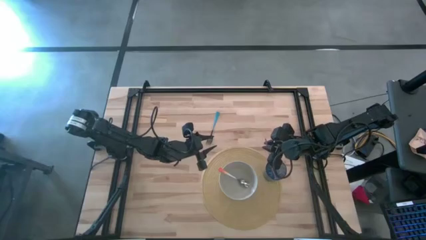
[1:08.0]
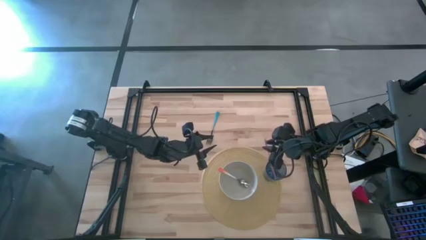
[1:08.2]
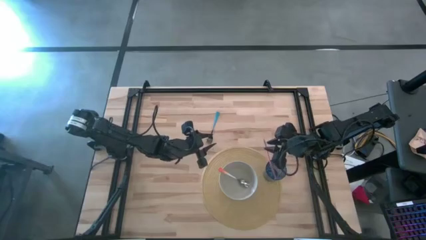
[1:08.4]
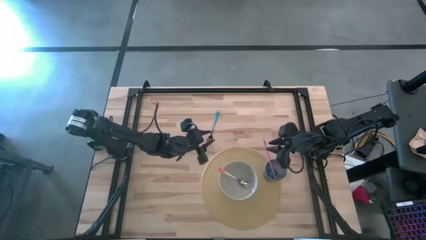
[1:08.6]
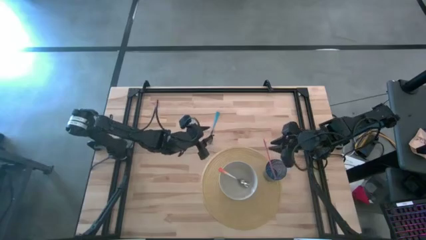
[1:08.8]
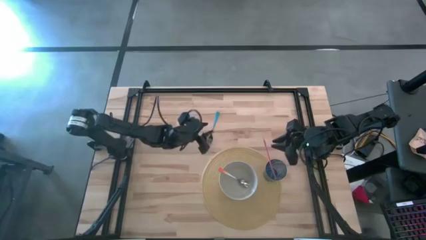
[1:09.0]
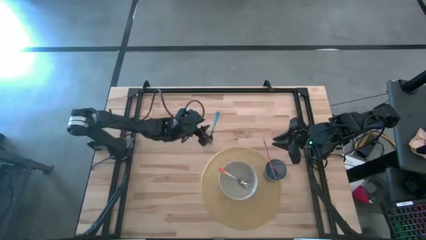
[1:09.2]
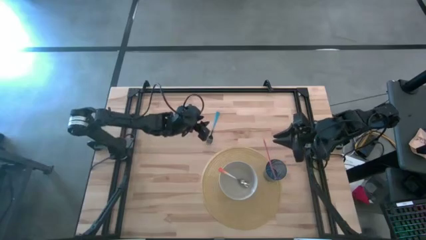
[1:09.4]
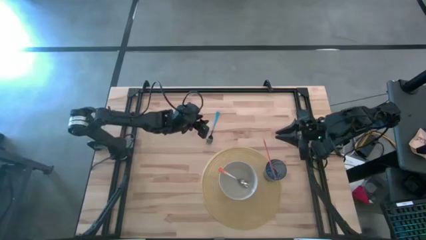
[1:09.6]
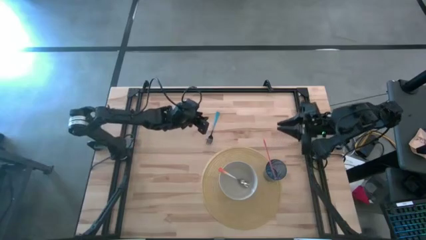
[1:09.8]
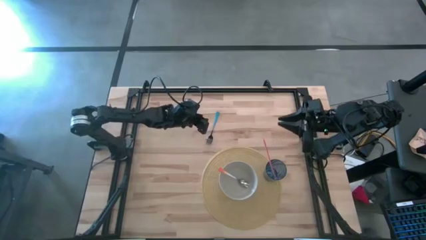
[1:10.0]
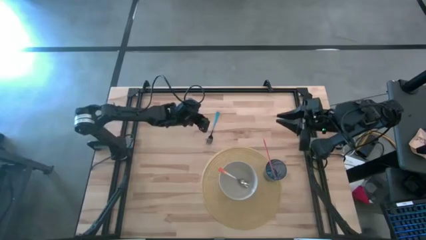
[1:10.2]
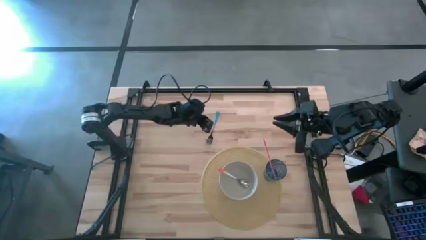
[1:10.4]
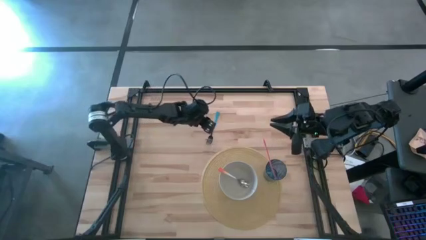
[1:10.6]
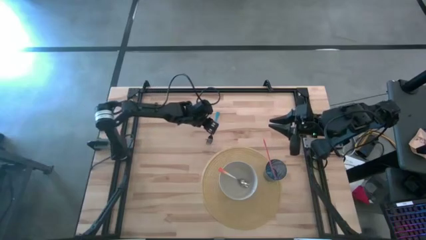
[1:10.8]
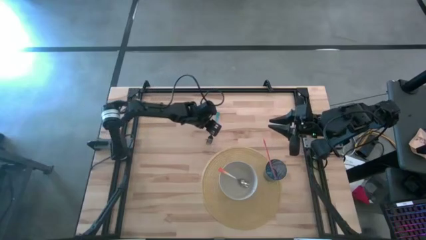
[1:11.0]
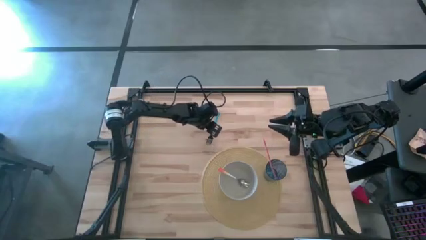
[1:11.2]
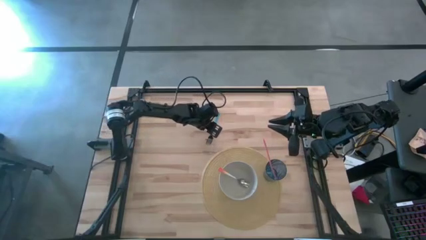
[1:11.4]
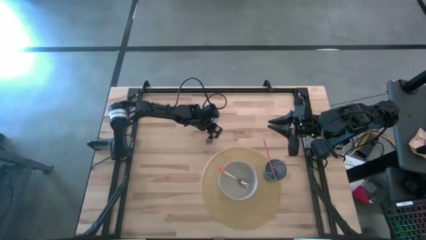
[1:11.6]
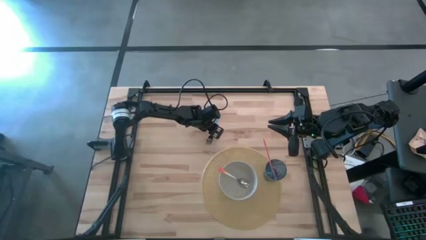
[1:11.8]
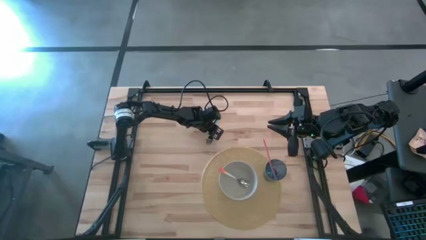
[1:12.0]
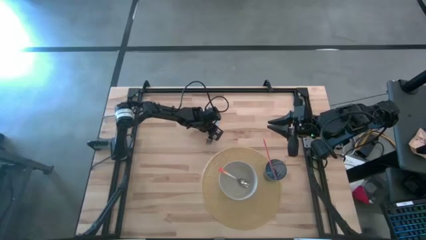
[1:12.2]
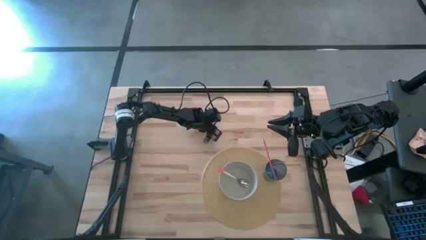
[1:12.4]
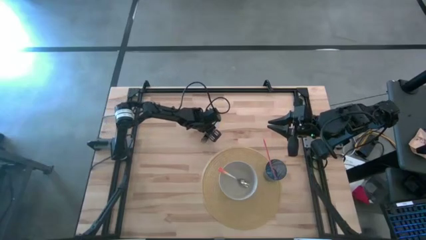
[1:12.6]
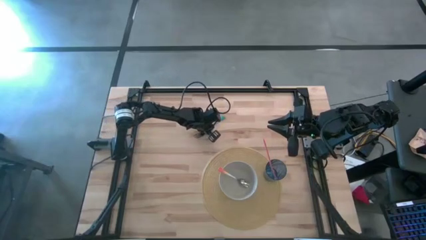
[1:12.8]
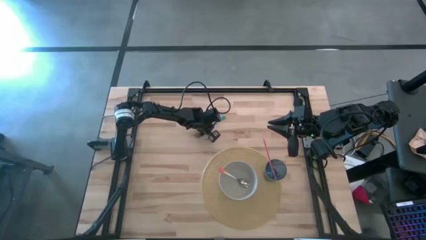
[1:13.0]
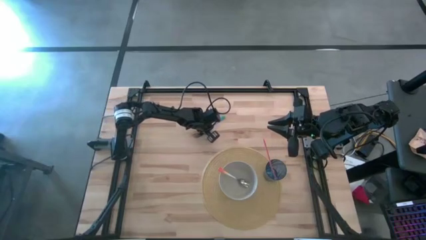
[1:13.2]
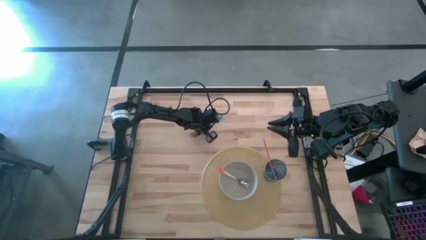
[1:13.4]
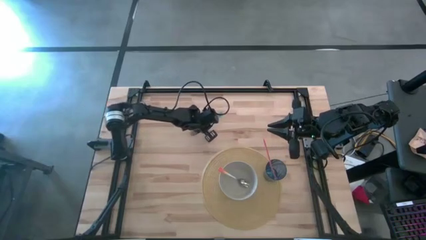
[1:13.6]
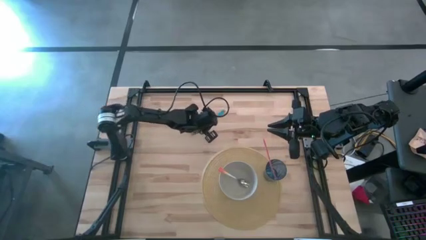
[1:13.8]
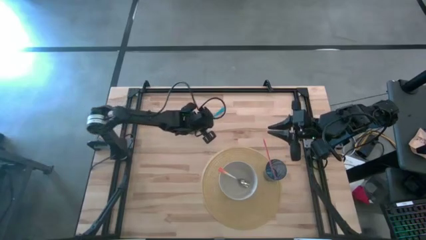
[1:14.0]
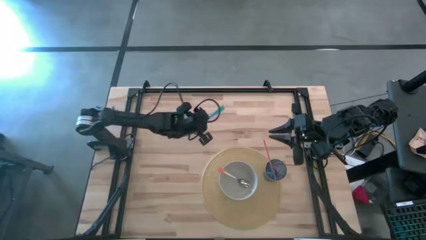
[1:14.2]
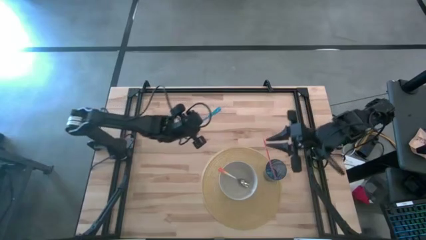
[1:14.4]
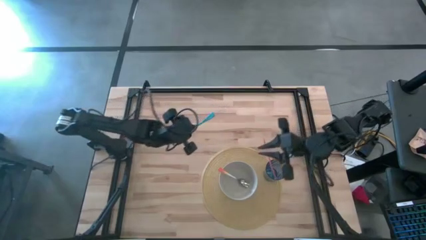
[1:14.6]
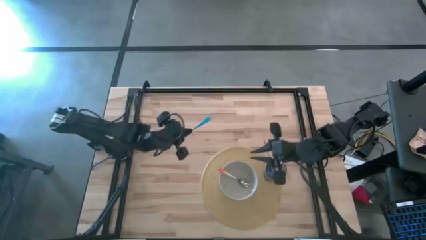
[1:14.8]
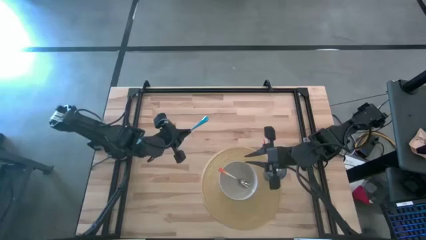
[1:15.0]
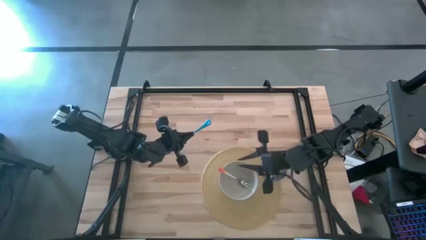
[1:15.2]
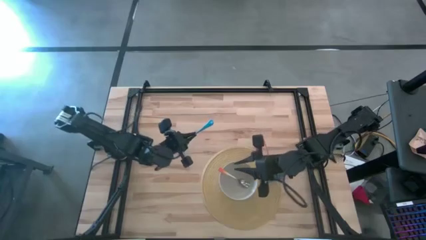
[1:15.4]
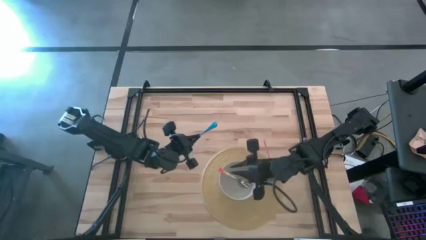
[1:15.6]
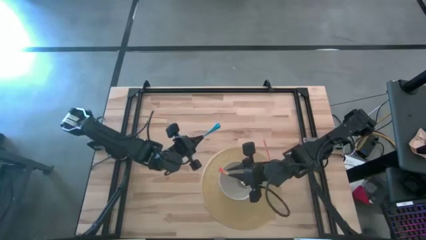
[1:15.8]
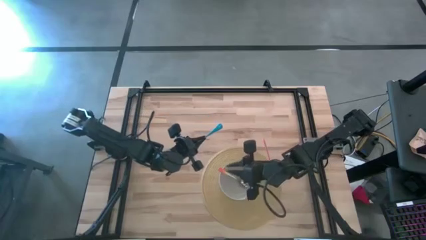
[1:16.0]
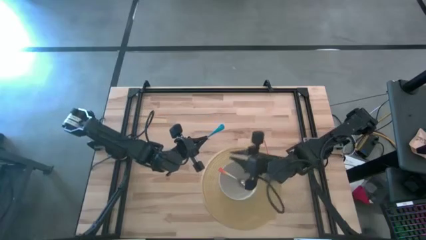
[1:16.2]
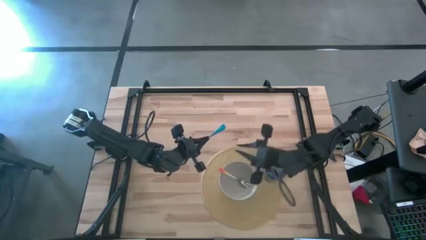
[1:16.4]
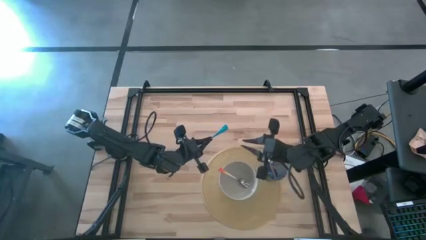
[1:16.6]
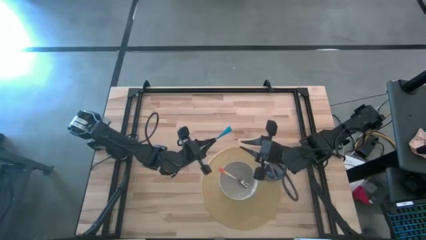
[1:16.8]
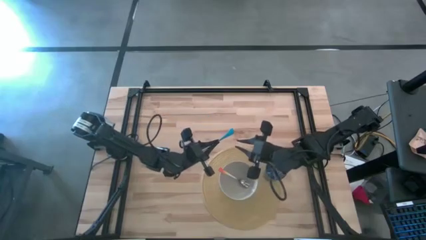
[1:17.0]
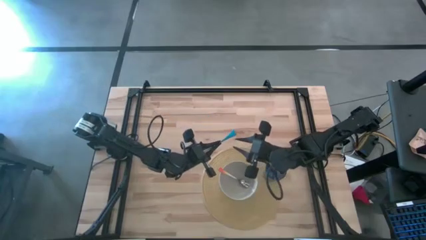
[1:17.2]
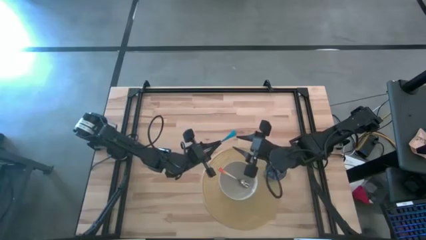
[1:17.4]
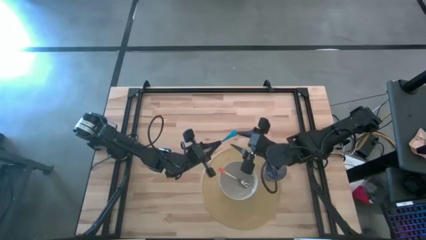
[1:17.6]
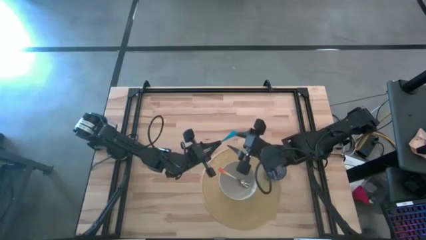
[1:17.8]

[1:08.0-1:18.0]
Task: Pick & Place Utensil
Put the blue fork into the gray bowl

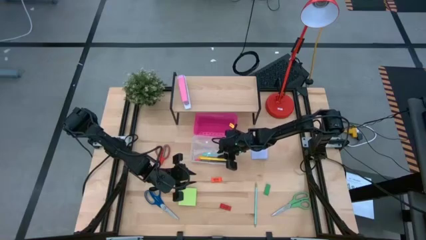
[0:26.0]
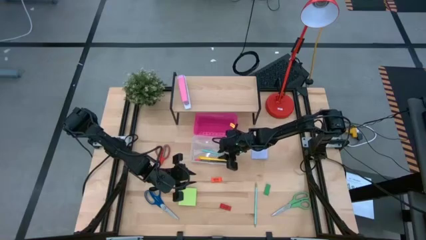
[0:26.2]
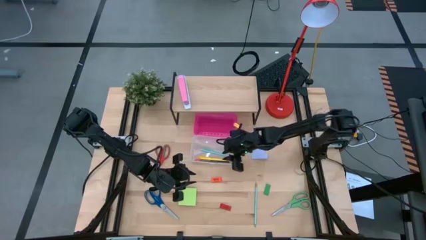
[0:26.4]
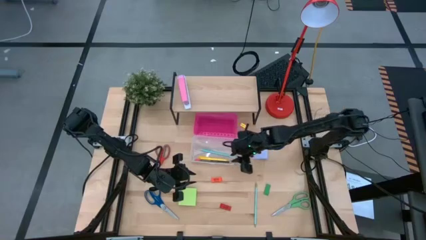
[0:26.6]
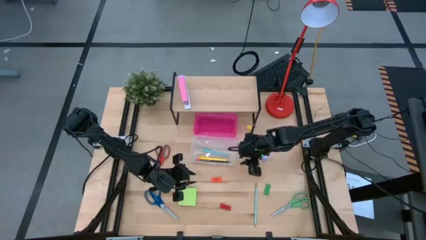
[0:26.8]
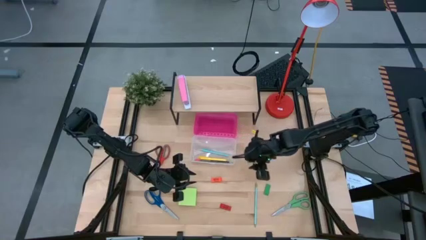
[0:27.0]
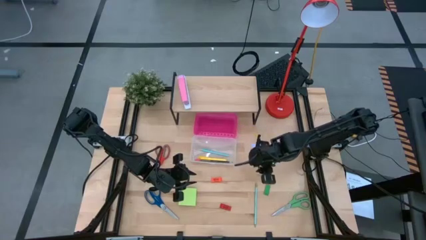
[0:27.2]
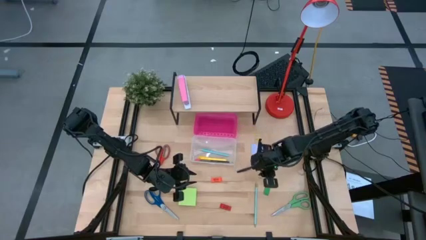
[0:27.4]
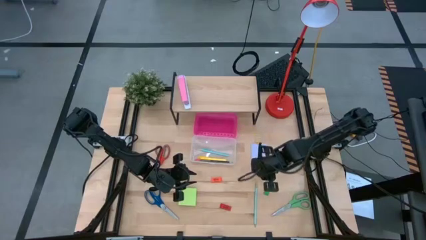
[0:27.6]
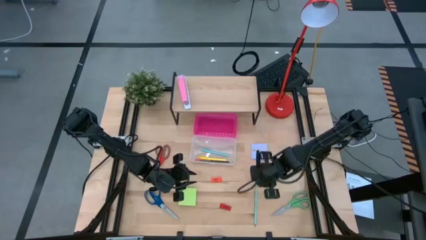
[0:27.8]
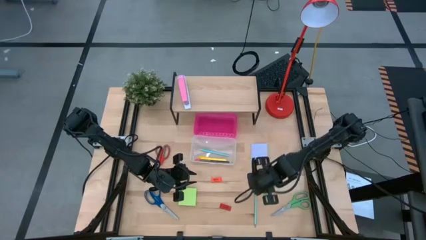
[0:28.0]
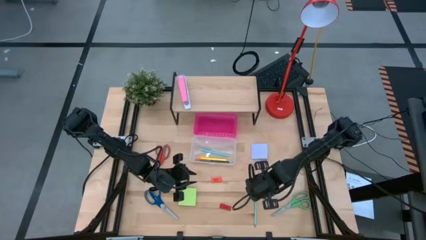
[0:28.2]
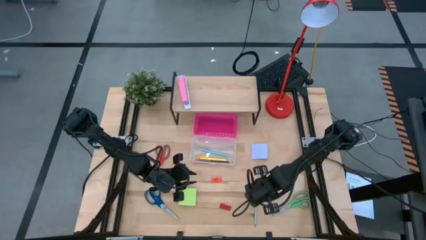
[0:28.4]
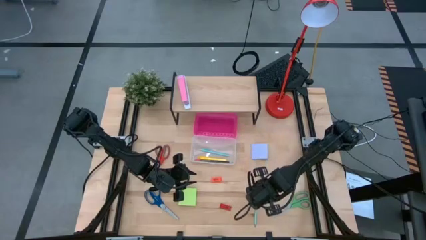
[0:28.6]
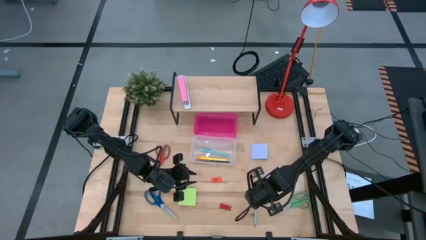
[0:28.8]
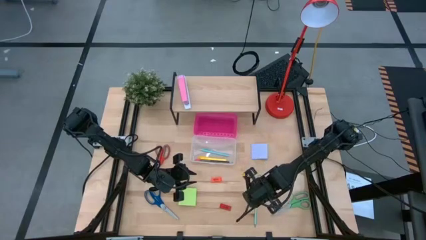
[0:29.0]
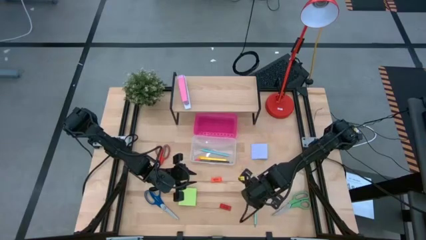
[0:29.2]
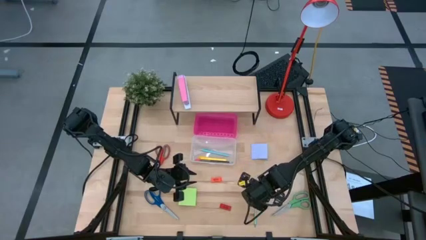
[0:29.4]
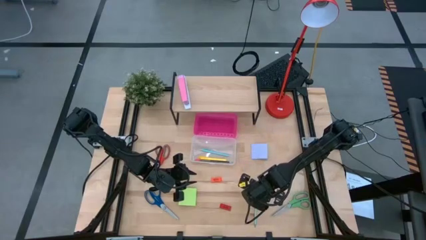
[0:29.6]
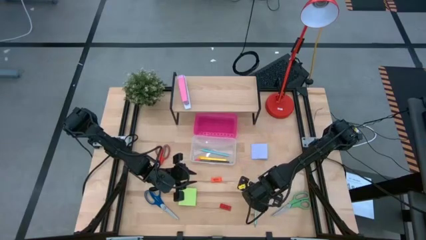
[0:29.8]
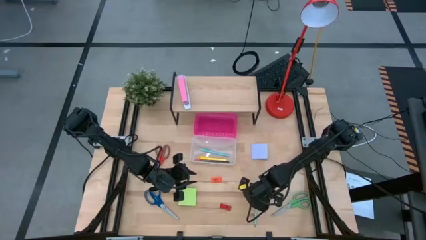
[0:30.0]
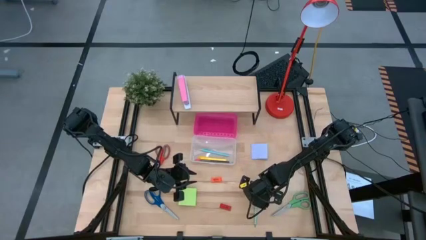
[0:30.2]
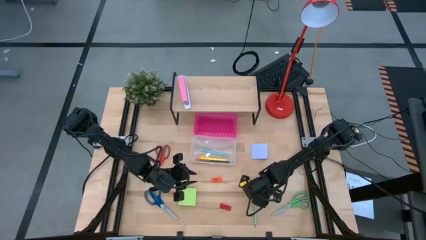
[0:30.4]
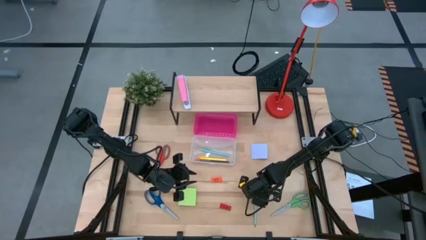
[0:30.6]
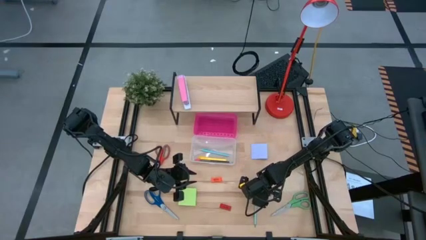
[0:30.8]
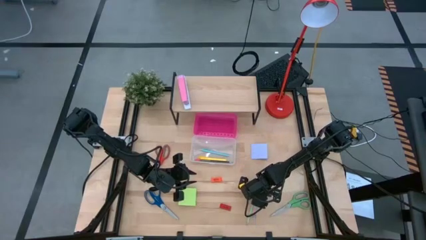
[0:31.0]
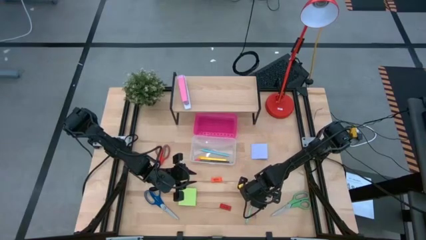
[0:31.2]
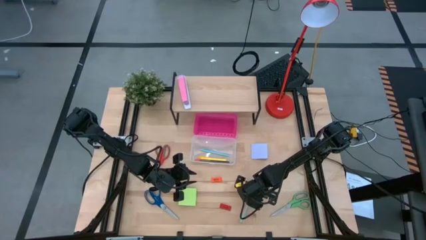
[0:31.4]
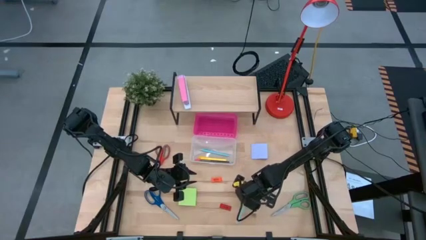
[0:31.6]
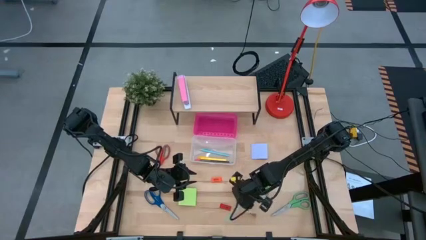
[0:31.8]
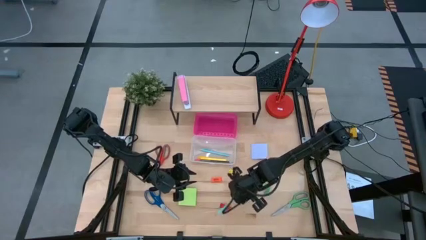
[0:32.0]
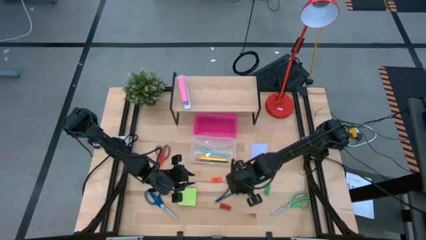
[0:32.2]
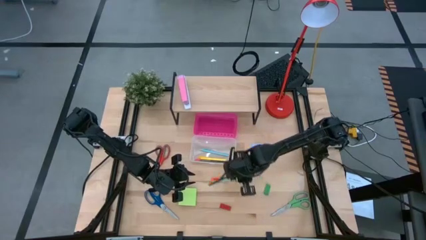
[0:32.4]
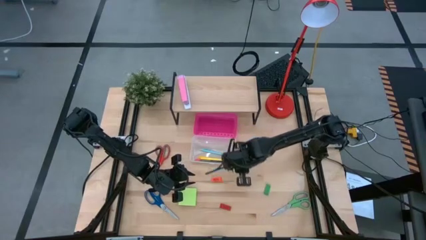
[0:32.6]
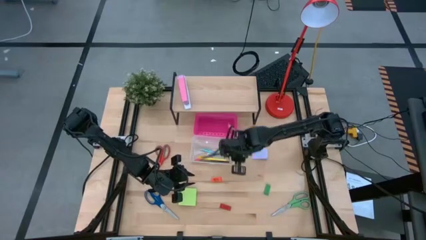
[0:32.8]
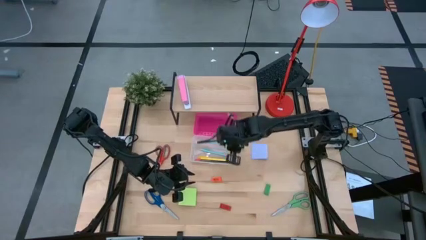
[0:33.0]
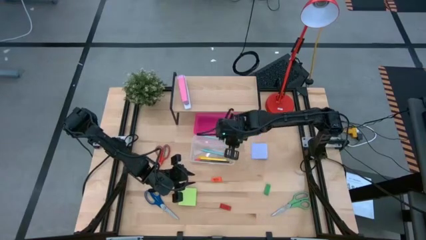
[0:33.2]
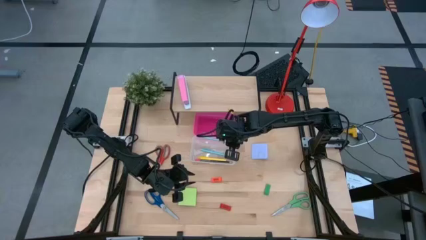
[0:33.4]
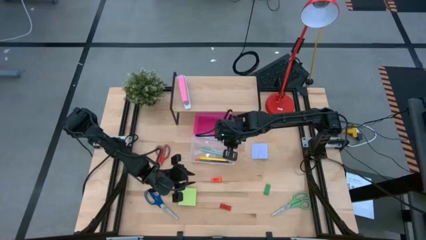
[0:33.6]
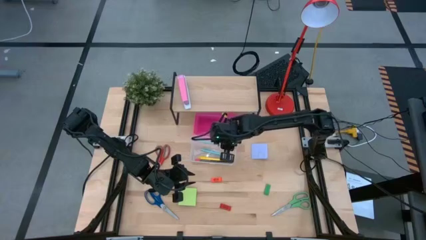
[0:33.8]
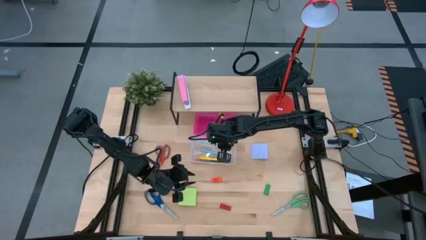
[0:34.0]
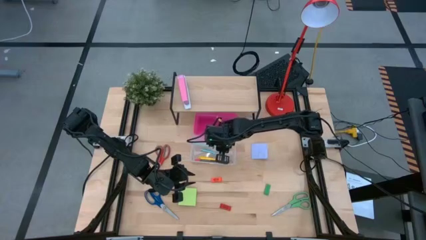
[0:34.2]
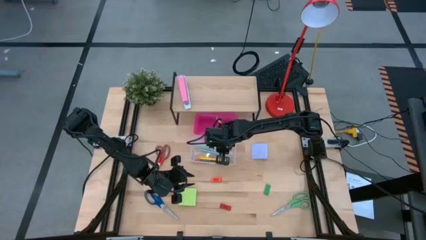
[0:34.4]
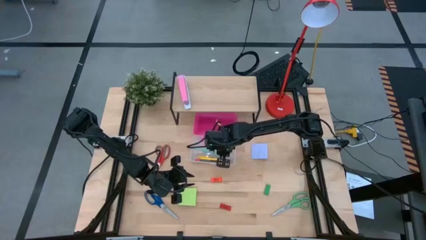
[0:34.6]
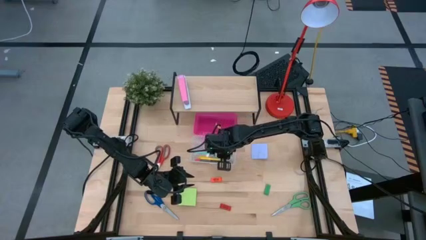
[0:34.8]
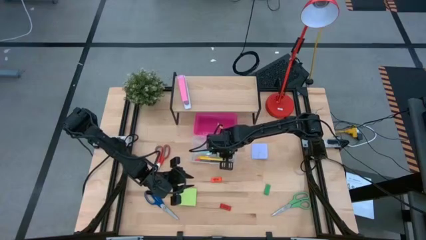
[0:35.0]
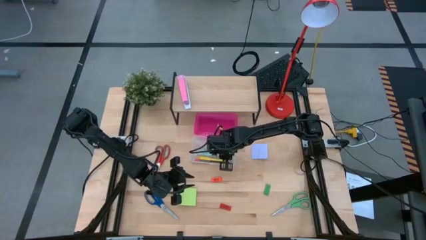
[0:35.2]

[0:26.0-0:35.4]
Task: Pack school essentials
Put the blue pencil into the supply box
